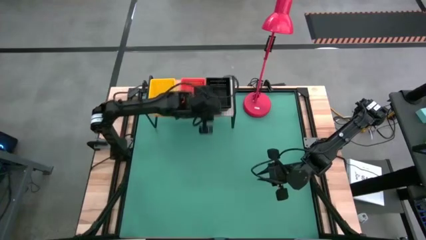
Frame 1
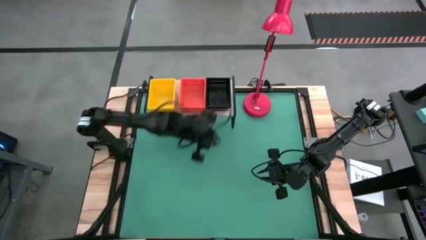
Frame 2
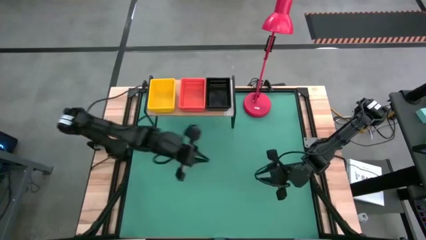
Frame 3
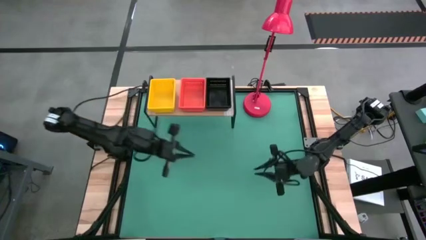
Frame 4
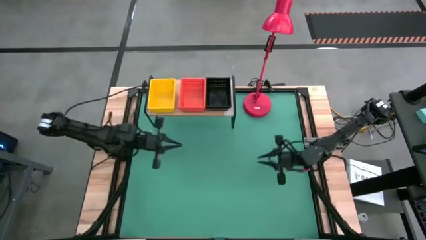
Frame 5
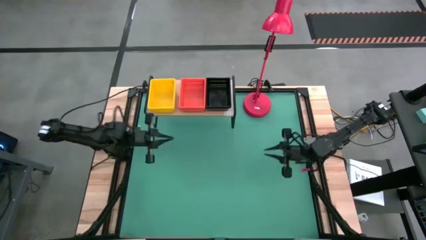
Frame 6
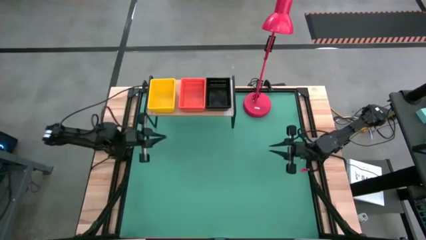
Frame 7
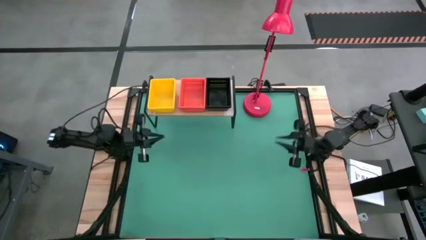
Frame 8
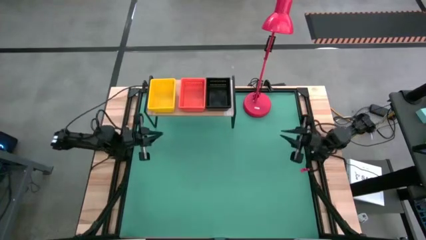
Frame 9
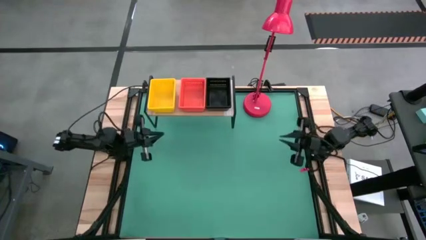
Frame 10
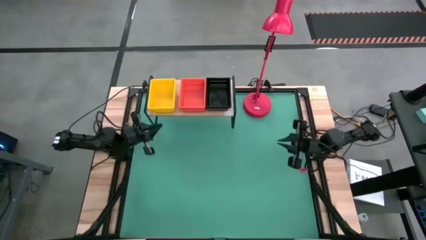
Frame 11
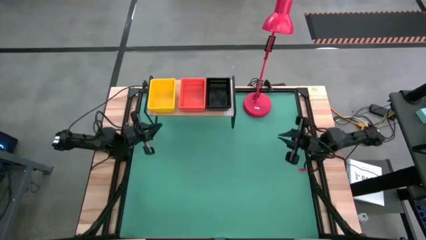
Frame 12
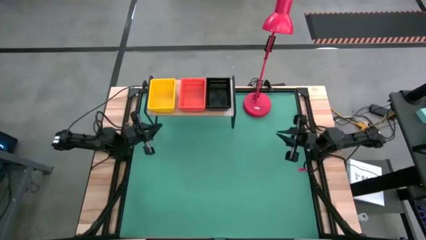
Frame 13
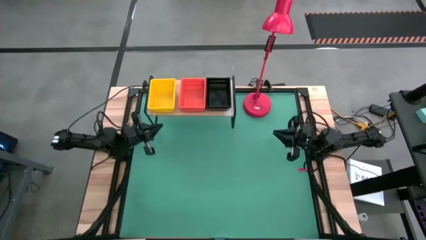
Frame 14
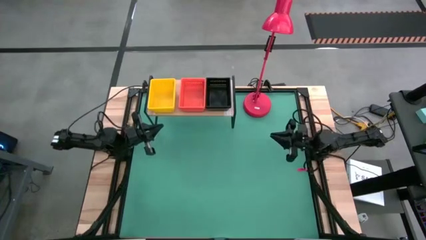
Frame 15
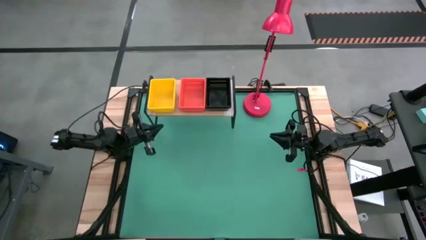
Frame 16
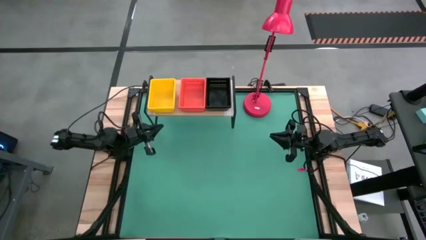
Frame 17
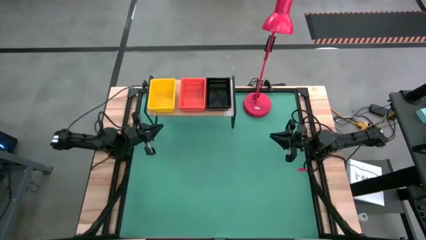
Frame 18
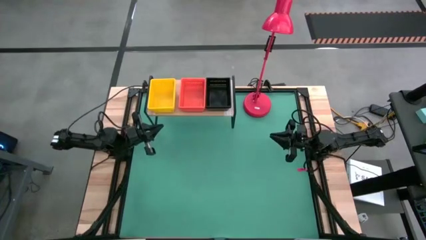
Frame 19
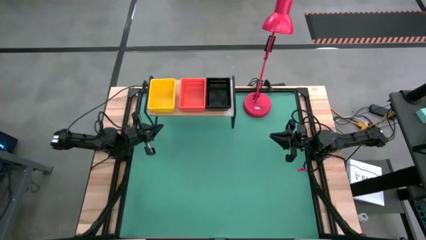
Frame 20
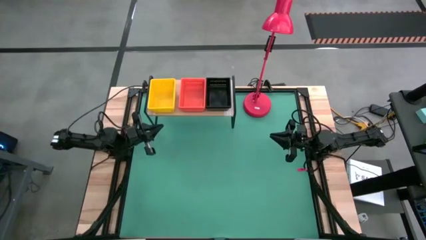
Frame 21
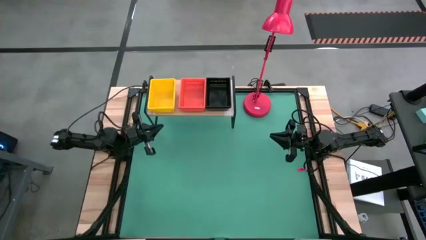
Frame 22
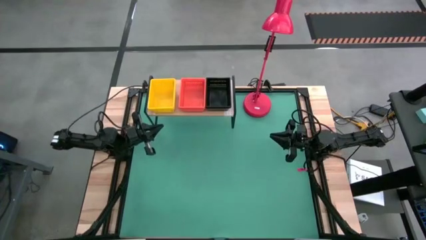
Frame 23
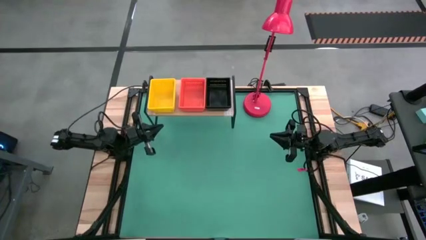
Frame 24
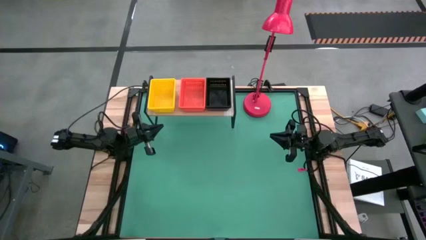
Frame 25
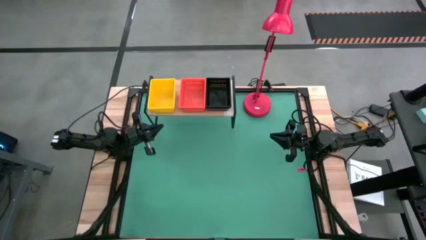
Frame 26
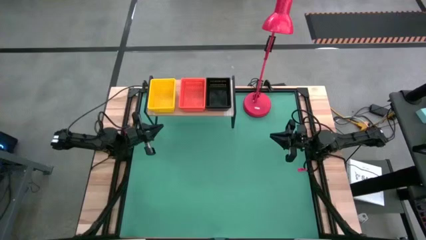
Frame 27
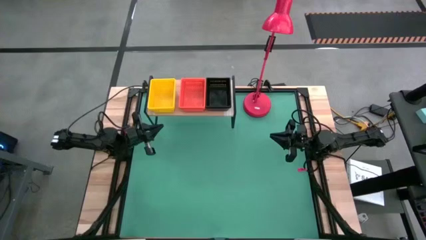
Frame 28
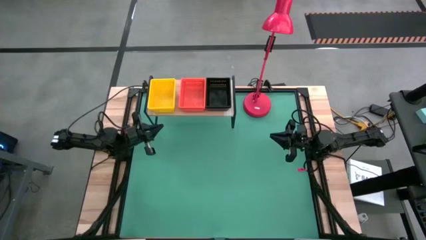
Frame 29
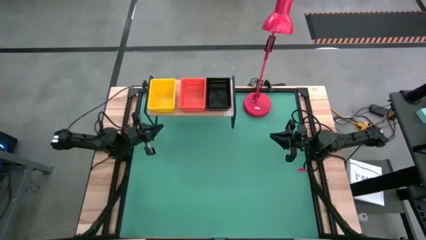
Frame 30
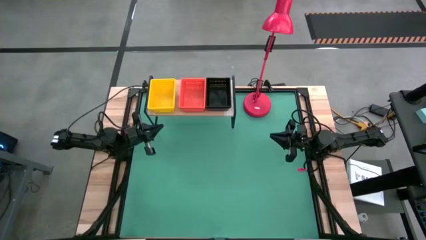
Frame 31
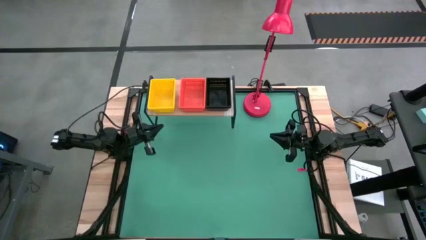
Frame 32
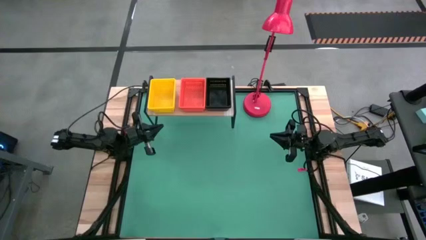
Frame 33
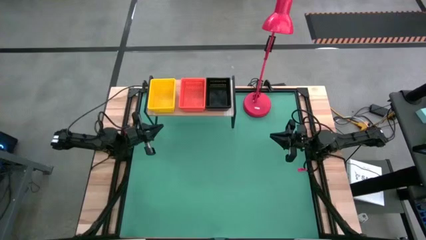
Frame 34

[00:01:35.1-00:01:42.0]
Task: Stack baskets on shelf by color
Return to home position

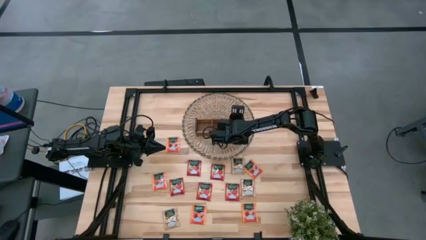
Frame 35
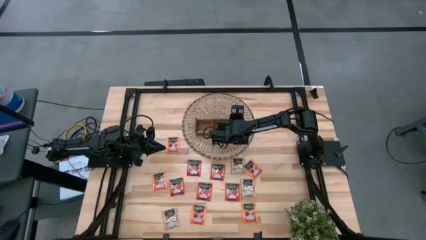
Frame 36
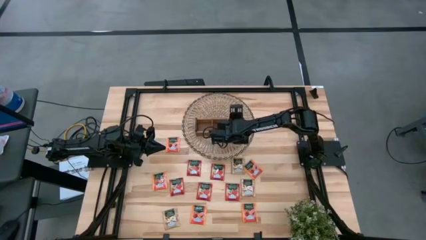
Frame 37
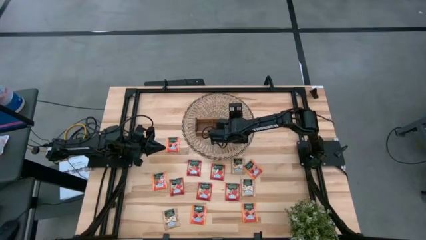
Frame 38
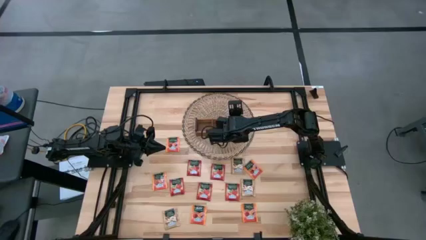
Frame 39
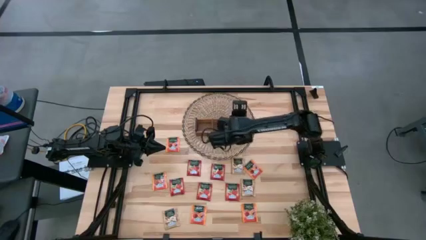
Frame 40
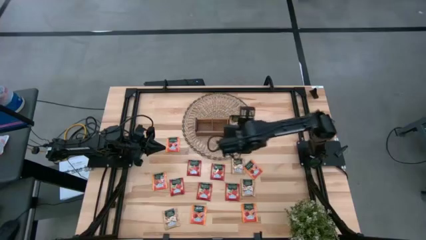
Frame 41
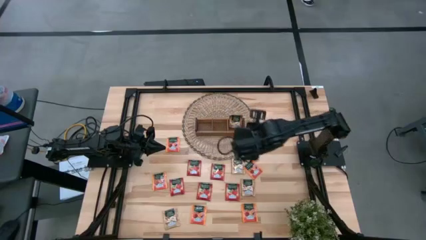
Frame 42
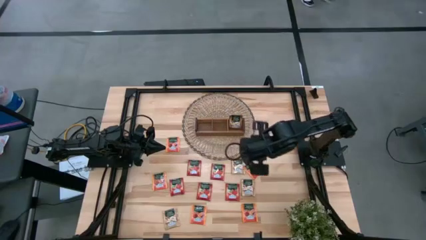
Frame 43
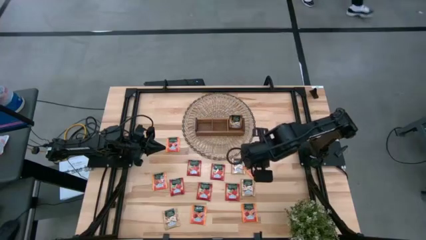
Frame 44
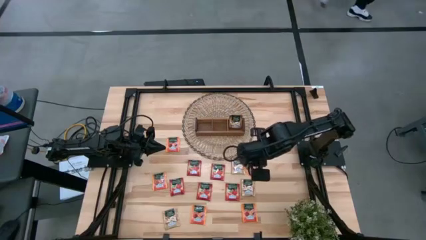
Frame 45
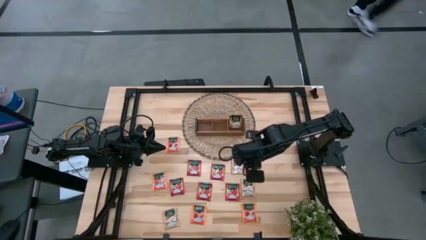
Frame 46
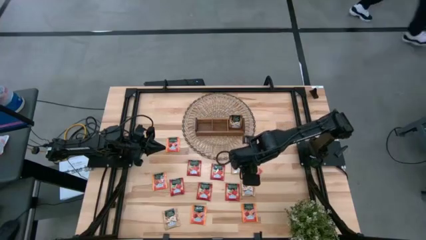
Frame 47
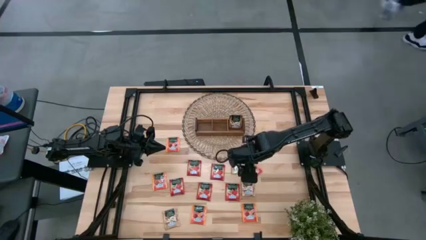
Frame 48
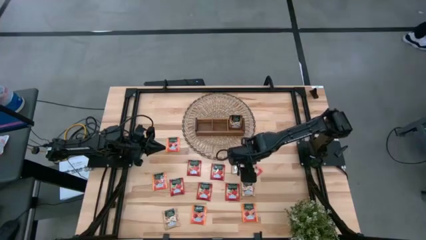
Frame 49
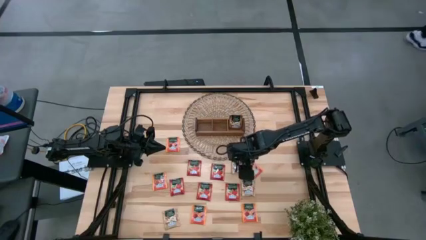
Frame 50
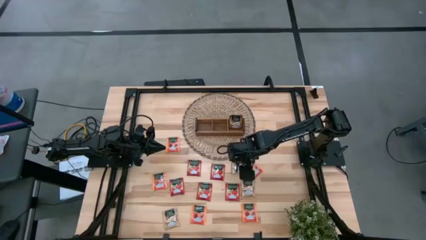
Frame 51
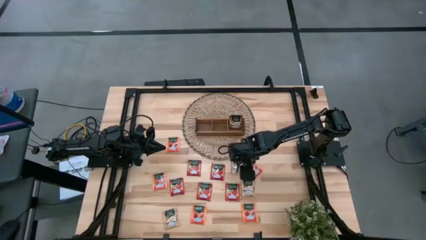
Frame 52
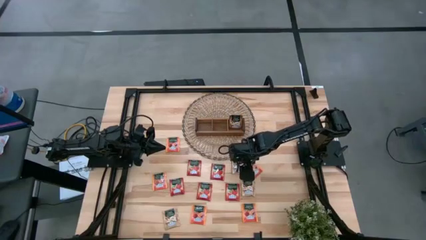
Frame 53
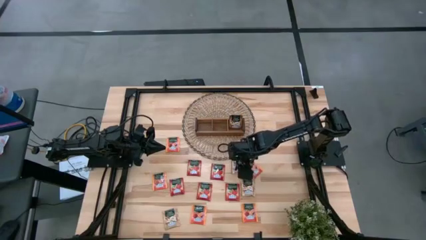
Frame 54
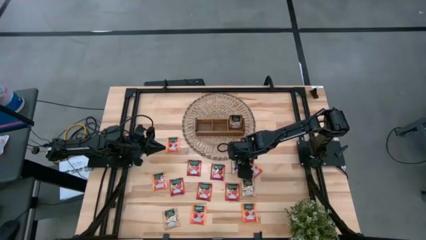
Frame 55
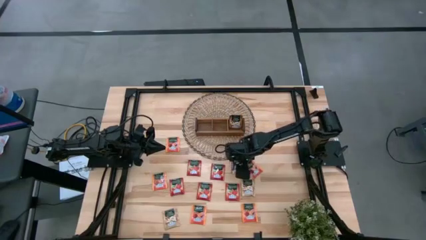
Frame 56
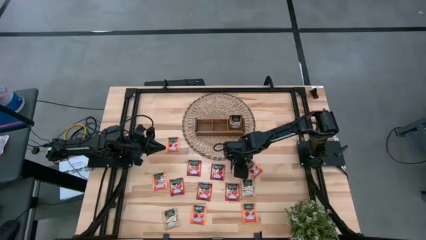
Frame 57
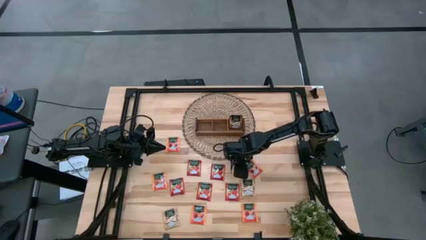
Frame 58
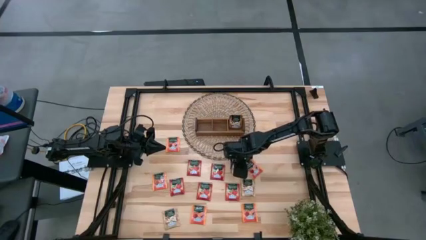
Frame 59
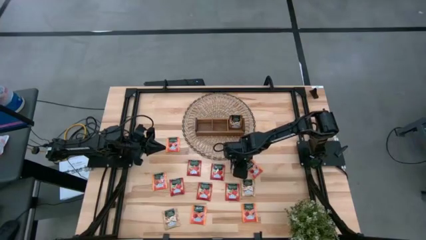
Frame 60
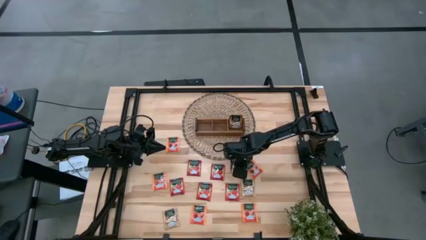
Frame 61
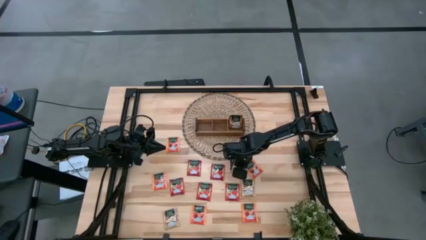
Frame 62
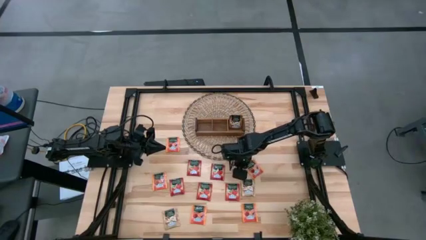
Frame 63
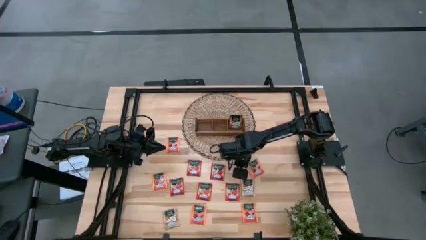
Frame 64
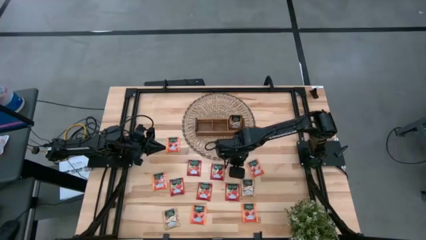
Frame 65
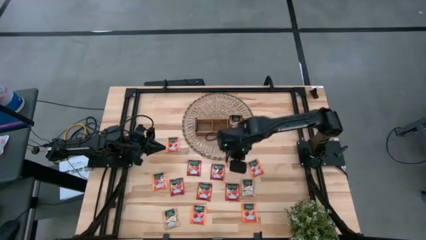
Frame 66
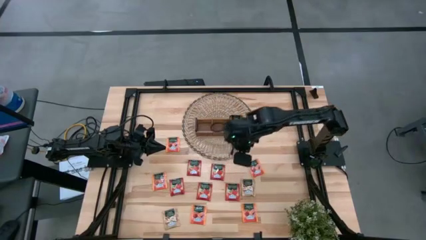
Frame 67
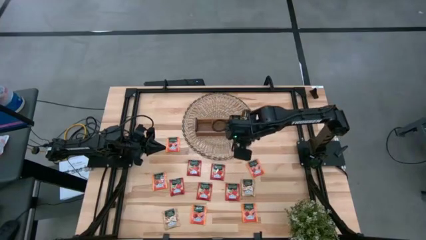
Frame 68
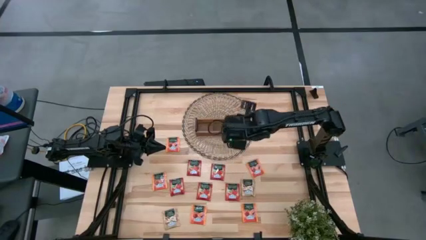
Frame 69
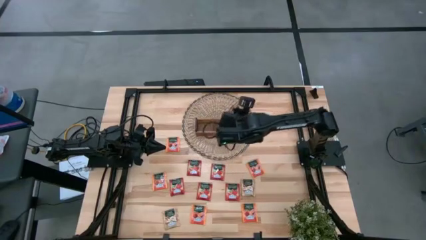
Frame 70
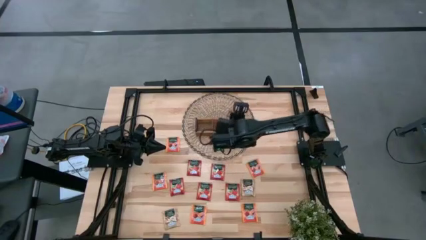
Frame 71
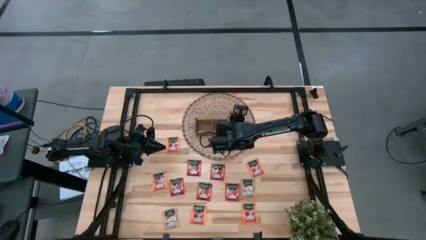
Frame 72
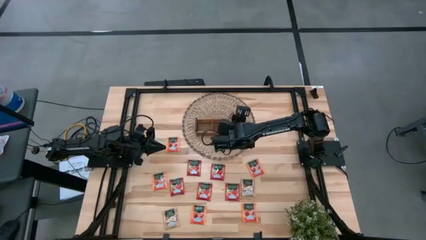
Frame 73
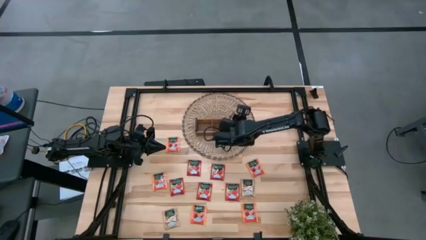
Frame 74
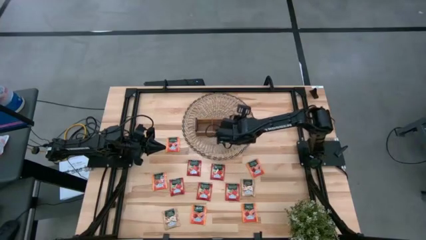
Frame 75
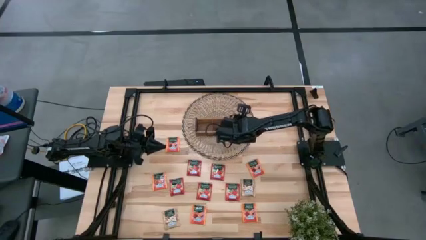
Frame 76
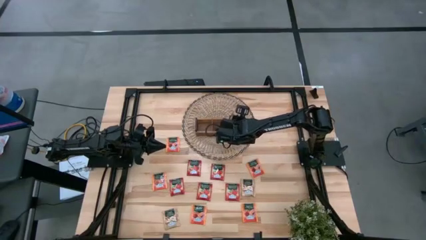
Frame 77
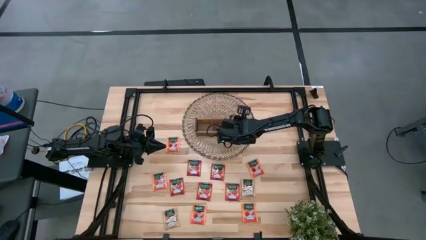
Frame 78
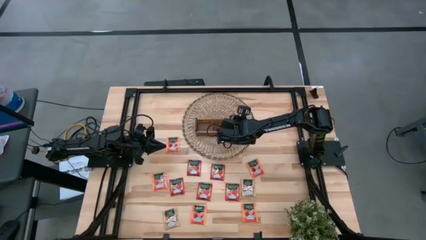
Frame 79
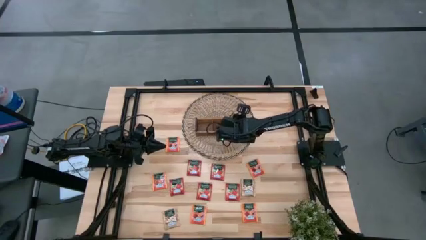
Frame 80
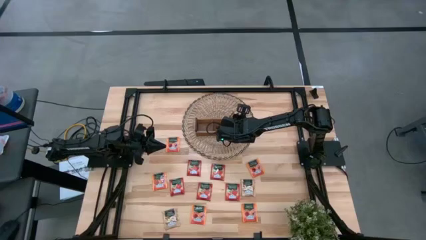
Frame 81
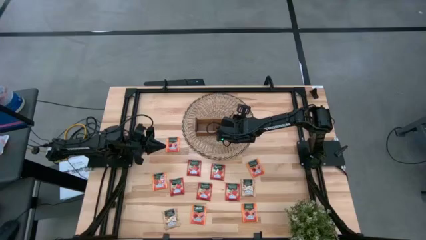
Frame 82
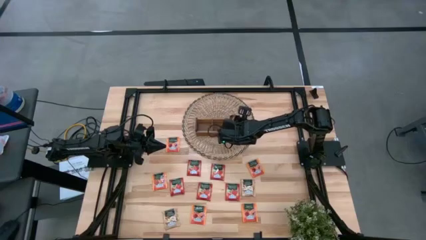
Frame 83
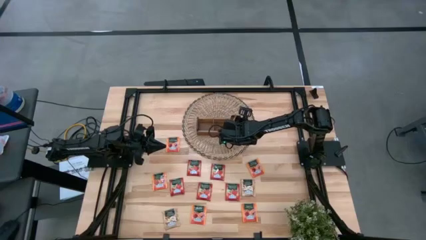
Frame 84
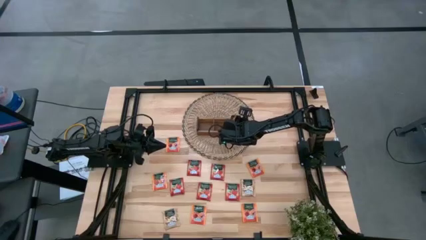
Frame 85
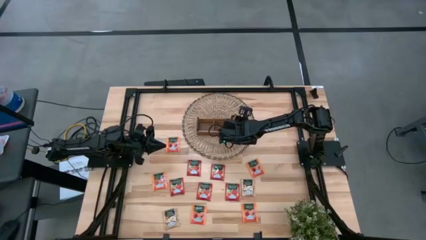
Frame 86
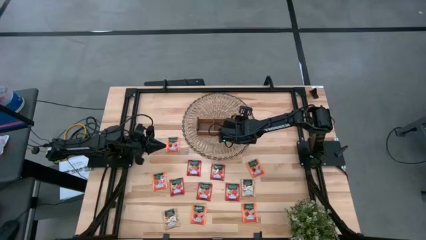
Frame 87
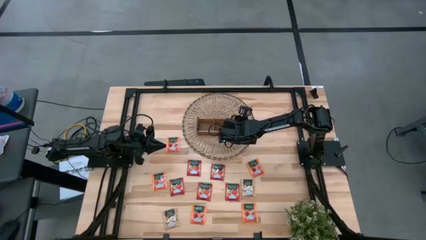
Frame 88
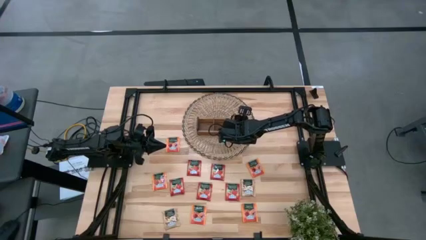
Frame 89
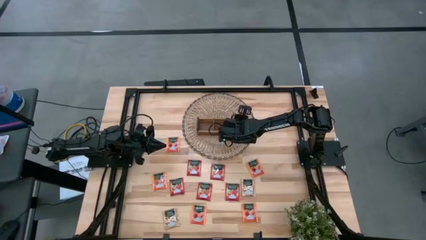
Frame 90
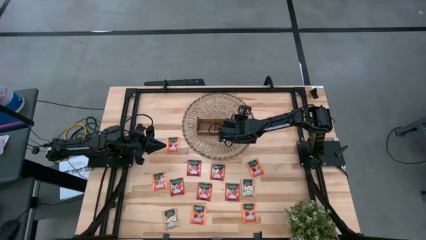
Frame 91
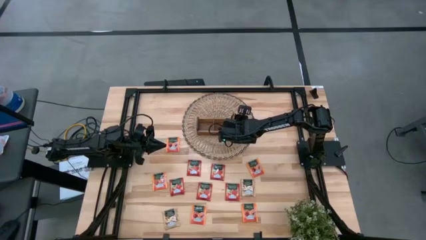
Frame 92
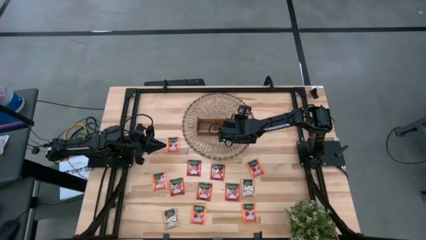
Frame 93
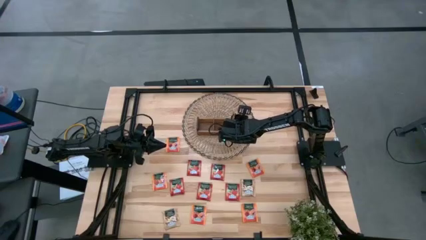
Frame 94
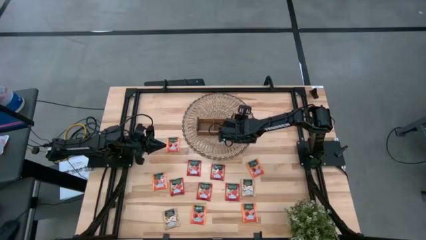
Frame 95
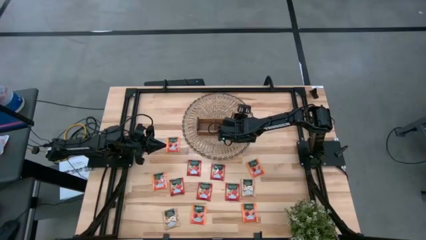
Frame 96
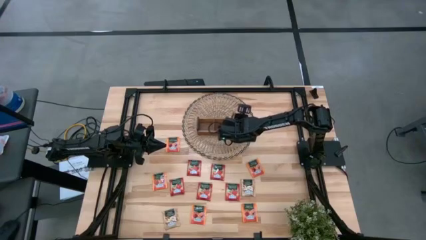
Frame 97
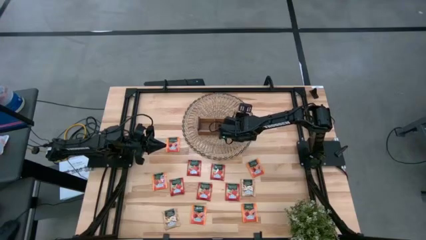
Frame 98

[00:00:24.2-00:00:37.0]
Task: Pick & Place Tea
Put the top right brown tea bag into the right slot of the wooden organizer
